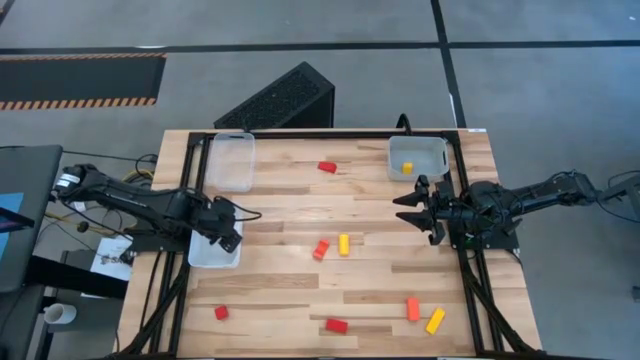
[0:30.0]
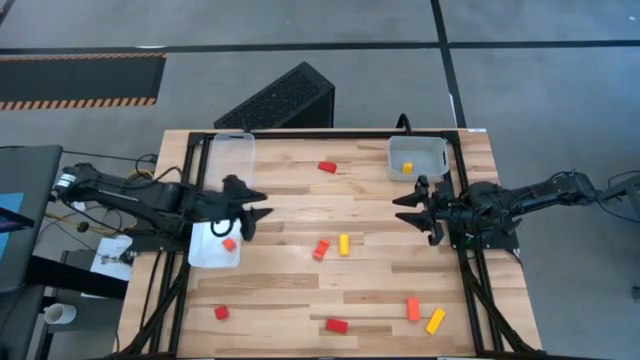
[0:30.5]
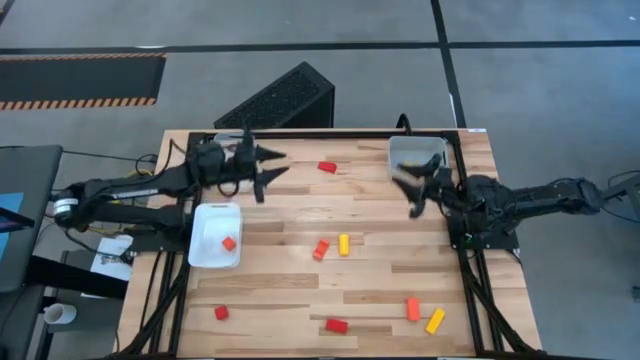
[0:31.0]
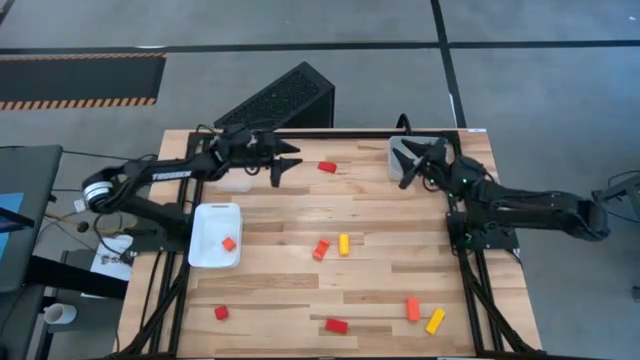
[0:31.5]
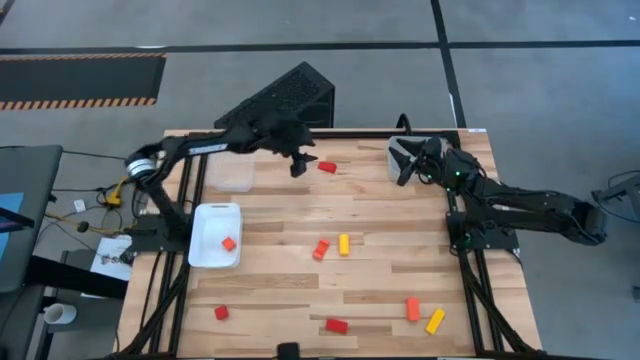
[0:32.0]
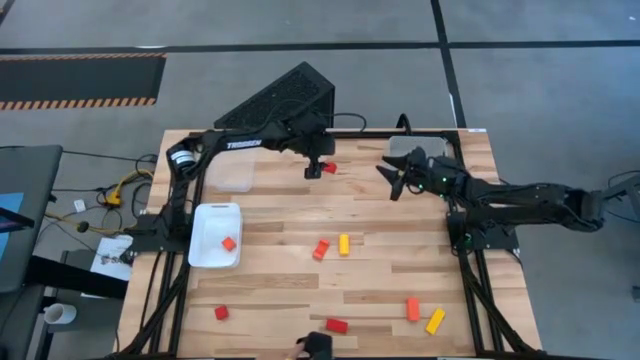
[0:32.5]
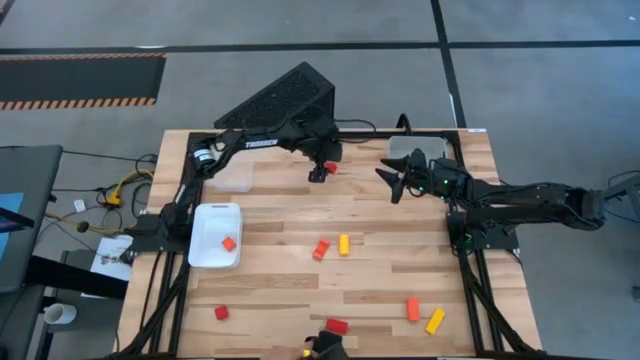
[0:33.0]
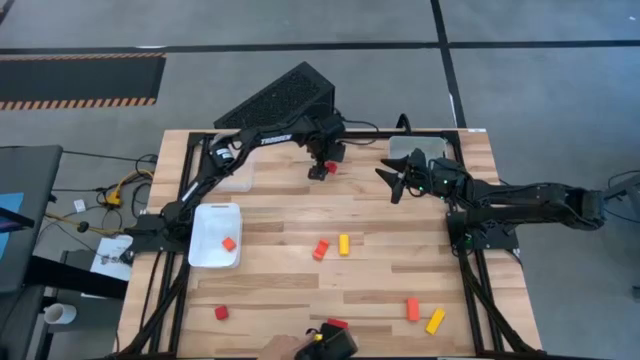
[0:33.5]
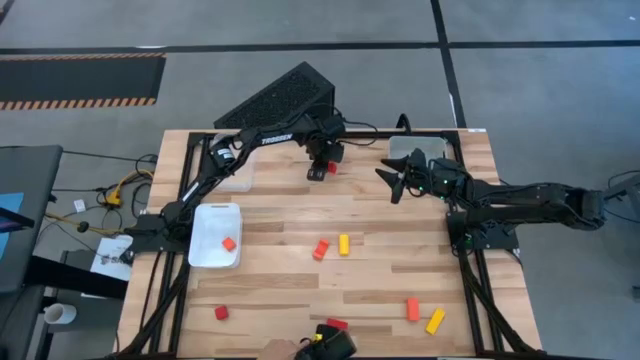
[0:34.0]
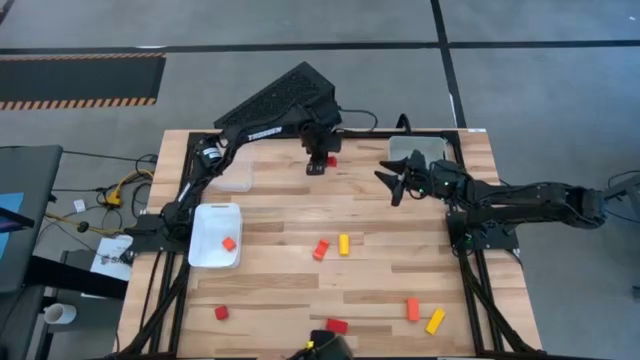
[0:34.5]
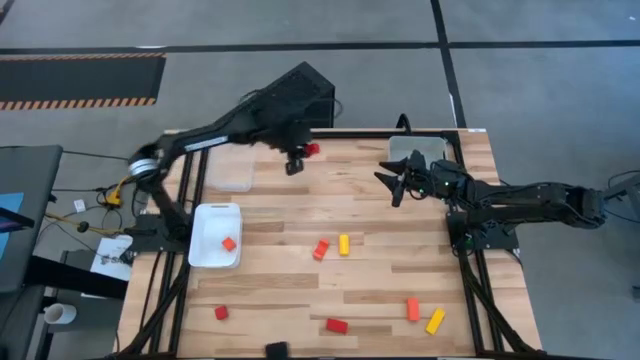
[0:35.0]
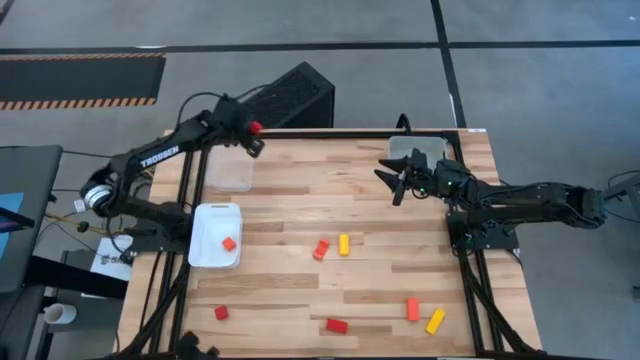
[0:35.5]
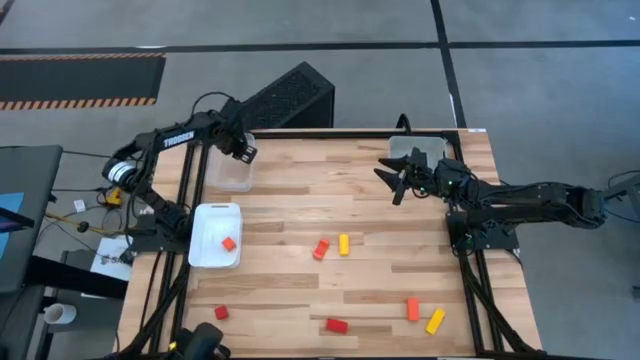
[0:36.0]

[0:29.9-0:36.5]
Task: Sort & place blocks by color
Put the top red block into the transparent bin

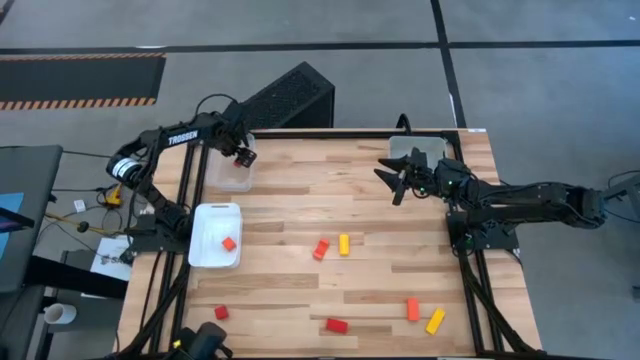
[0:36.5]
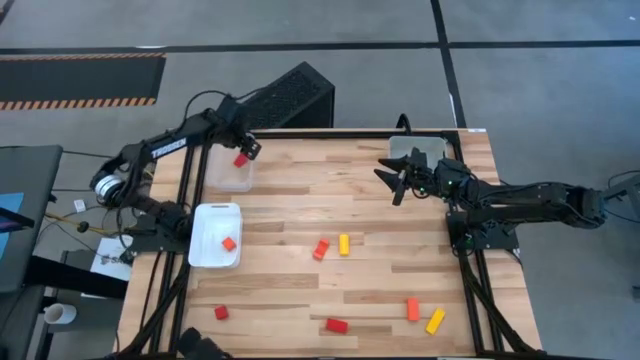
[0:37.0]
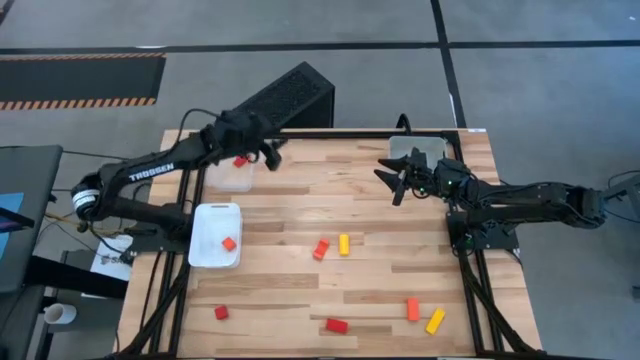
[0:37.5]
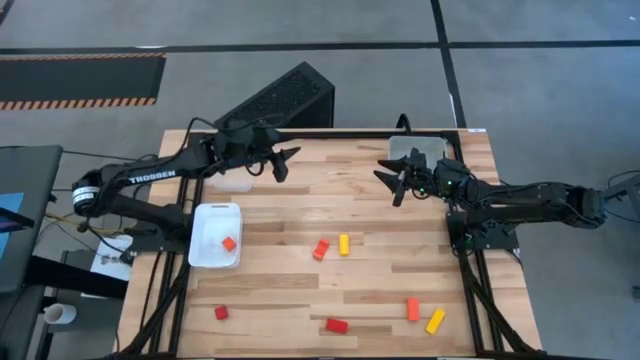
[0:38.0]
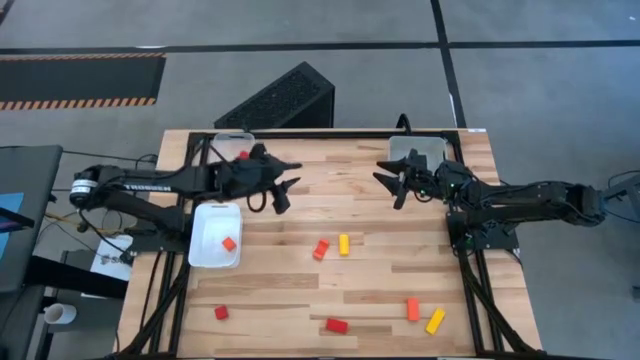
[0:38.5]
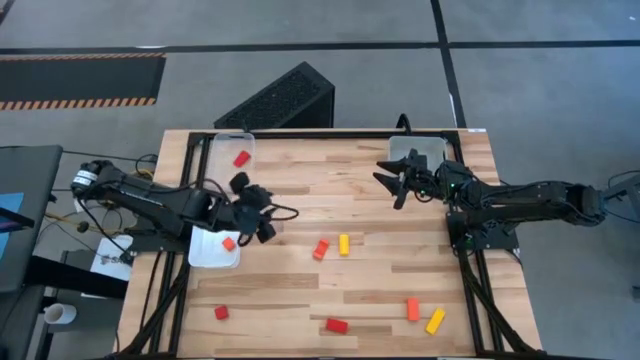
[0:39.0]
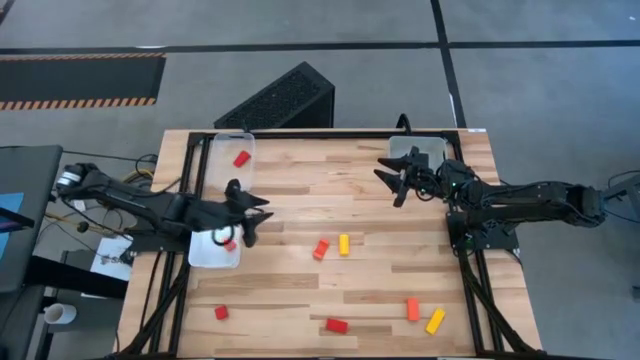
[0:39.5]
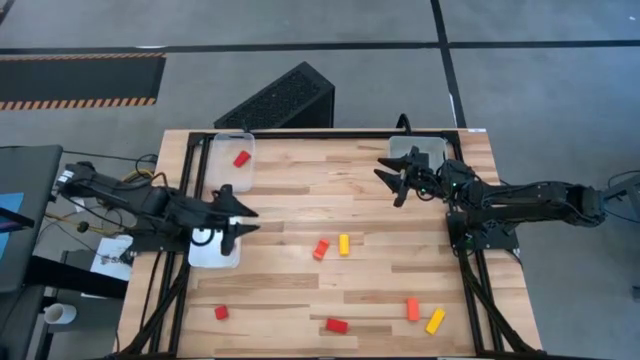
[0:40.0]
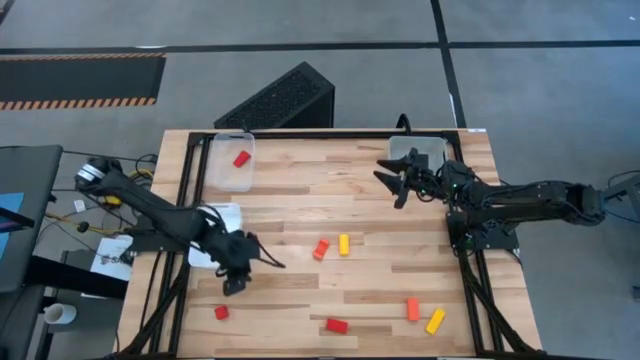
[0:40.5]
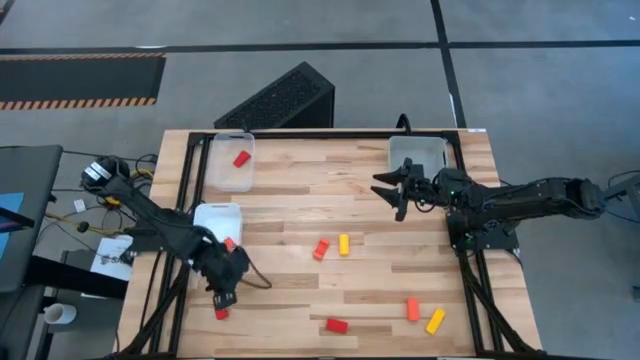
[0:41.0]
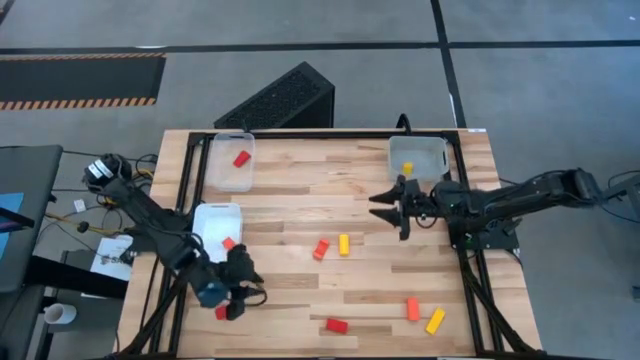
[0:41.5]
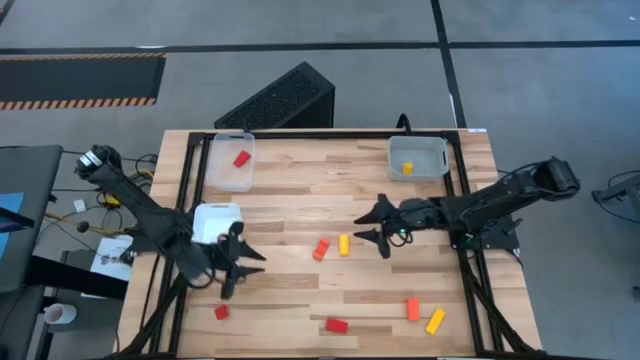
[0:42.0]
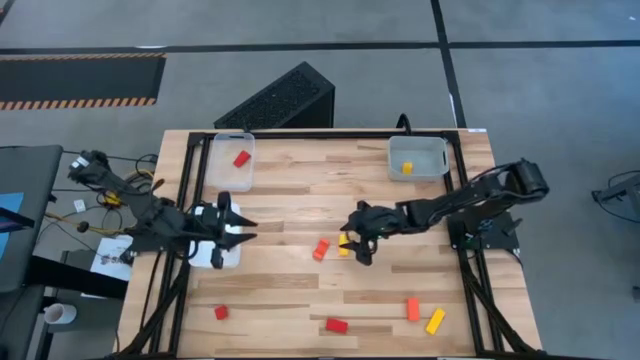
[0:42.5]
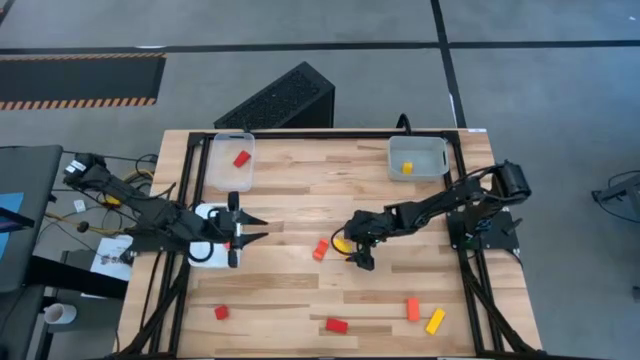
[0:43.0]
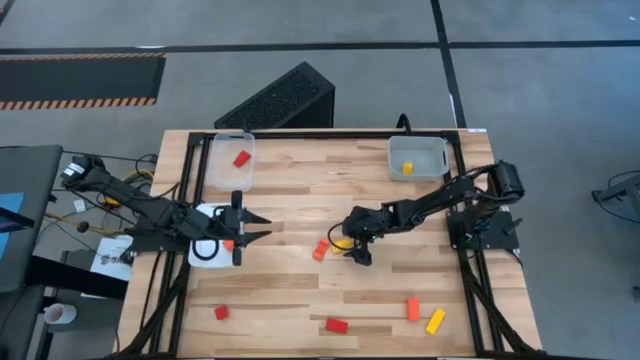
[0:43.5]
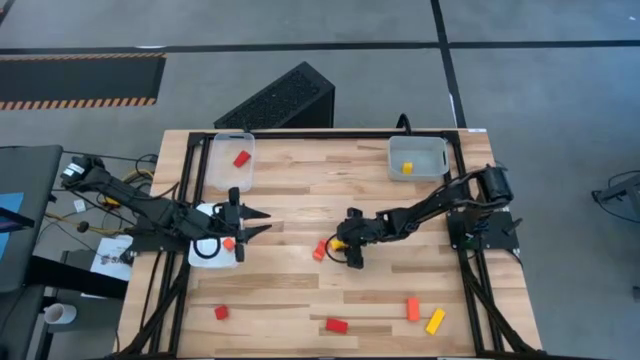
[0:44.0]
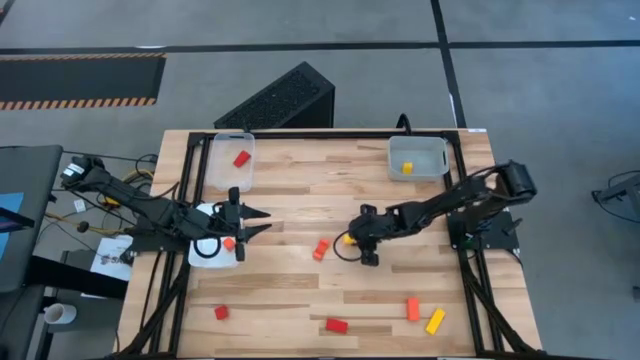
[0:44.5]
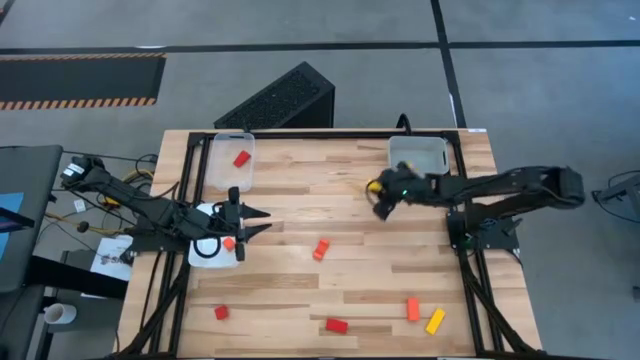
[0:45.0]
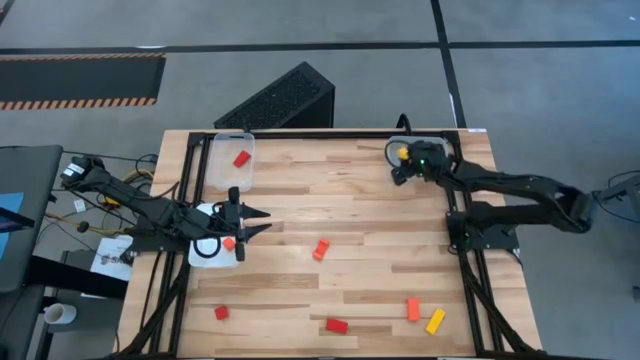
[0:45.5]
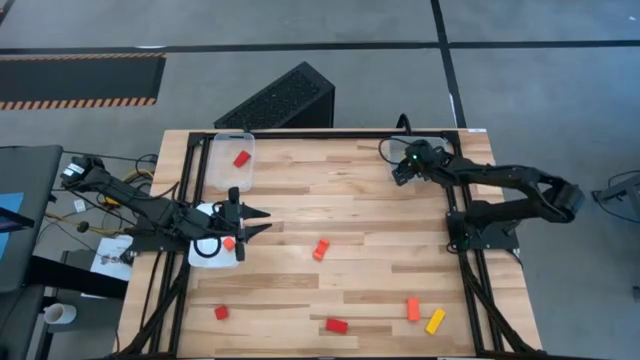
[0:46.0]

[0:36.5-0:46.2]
Put the top yellow block into the gray bin

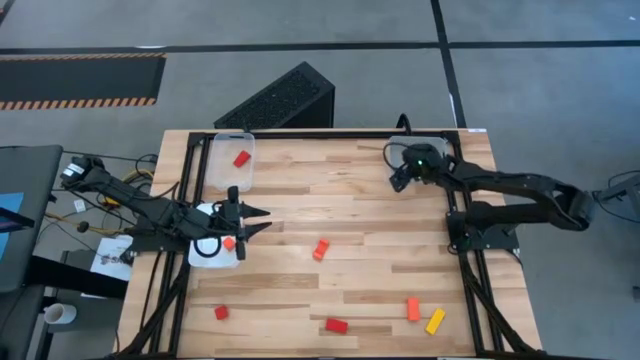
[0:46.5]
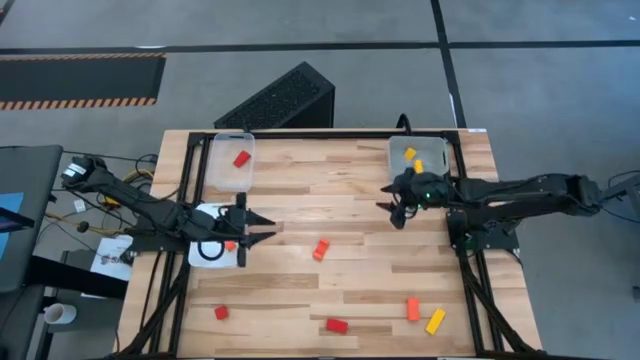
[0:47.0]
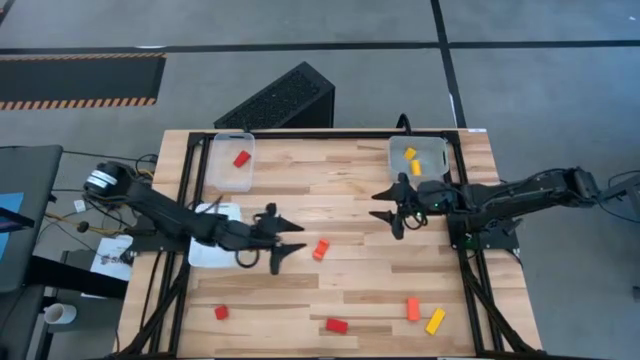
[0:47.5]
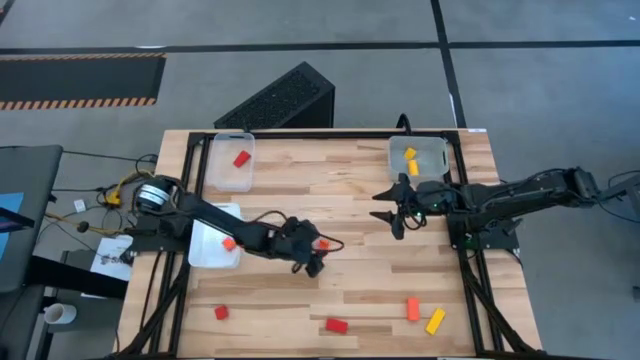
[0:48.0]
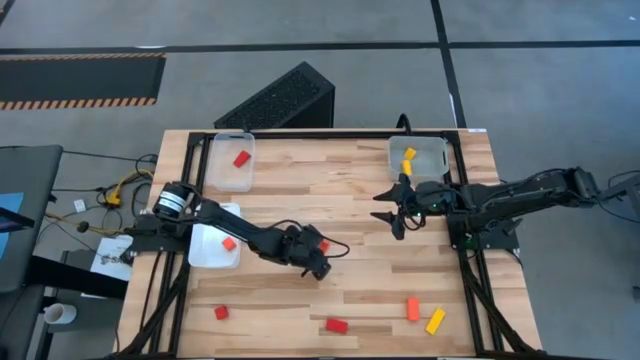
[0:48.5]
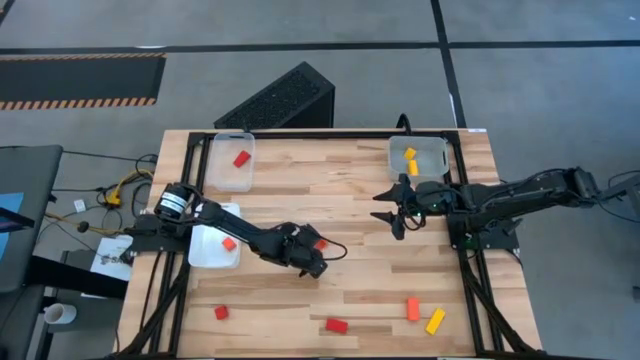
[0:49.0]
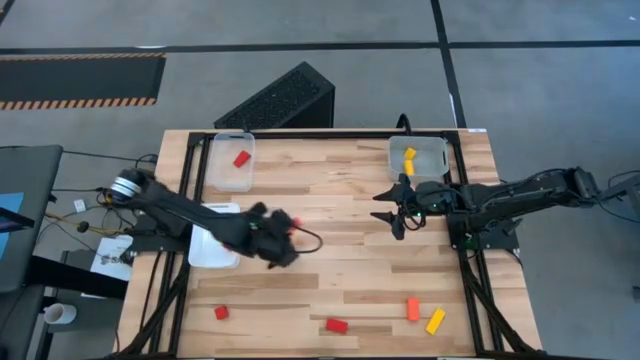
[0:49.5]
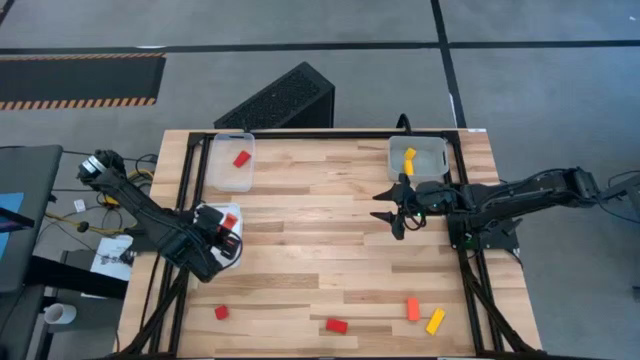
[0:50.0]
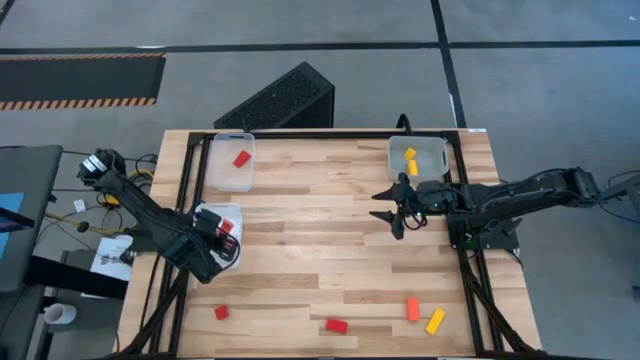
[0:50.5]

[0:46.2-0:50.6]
Put the top orange block into the white bin
